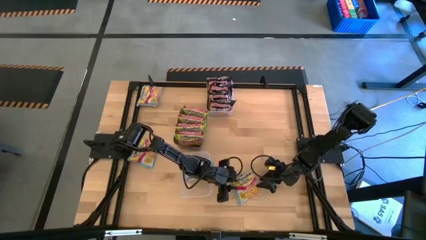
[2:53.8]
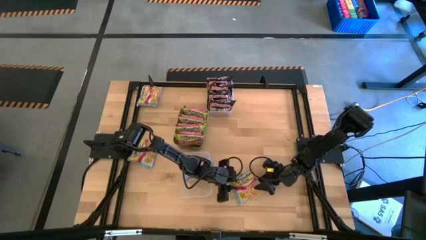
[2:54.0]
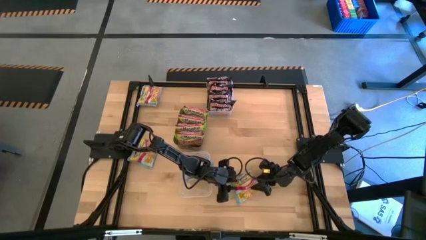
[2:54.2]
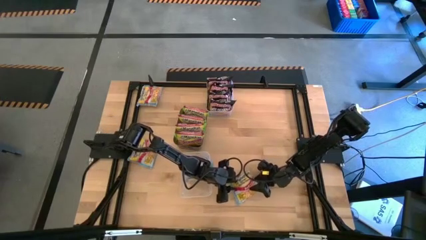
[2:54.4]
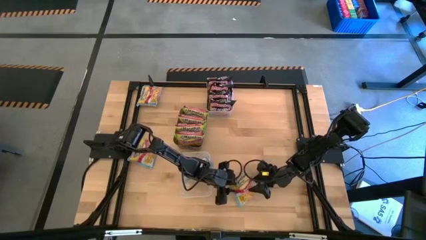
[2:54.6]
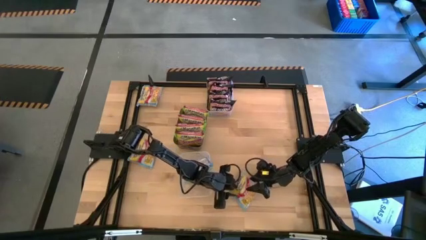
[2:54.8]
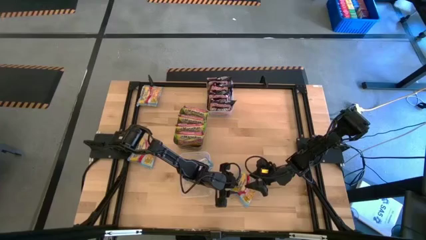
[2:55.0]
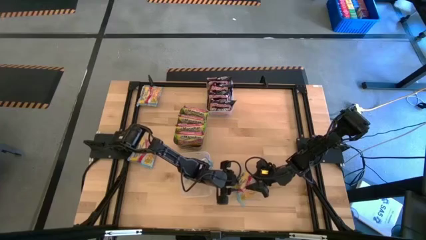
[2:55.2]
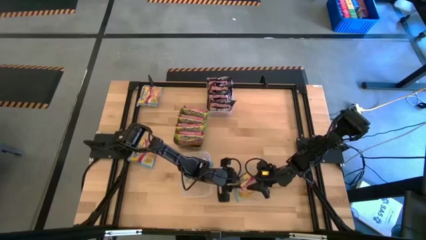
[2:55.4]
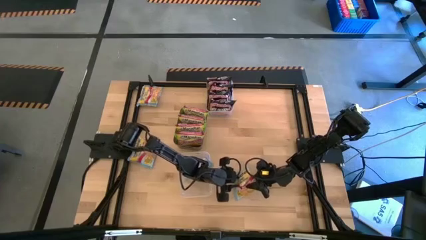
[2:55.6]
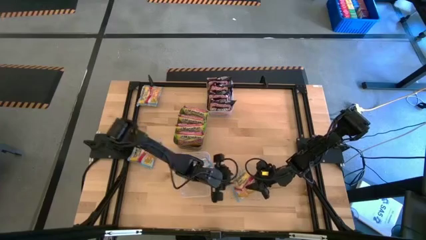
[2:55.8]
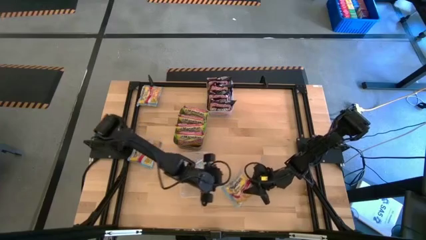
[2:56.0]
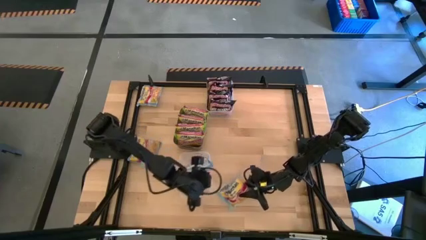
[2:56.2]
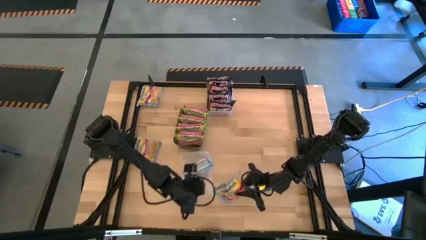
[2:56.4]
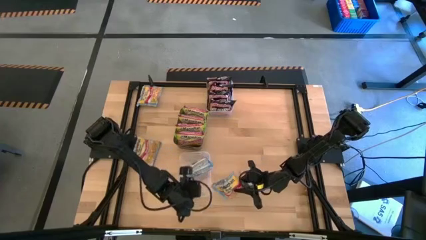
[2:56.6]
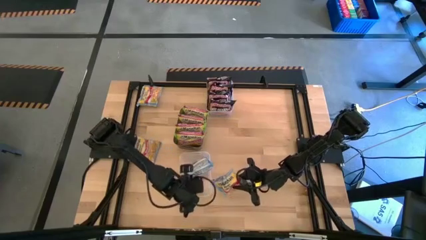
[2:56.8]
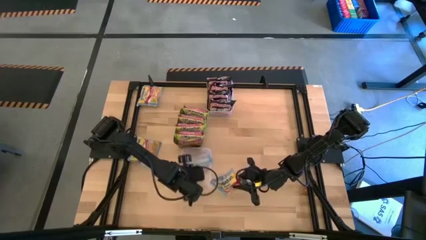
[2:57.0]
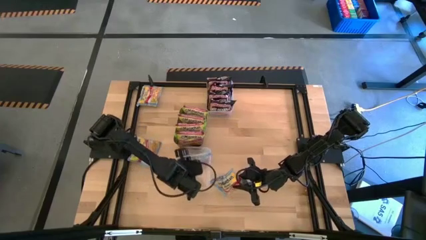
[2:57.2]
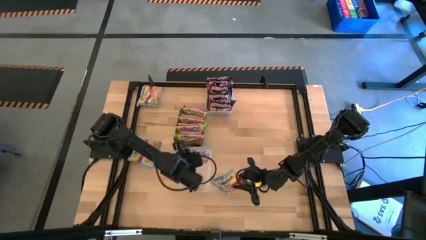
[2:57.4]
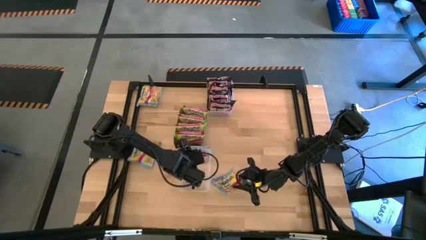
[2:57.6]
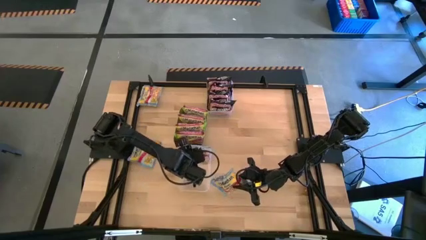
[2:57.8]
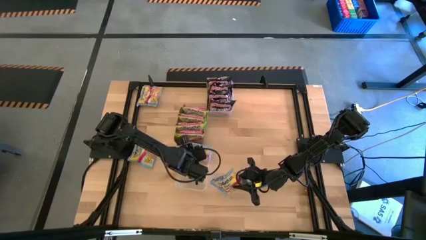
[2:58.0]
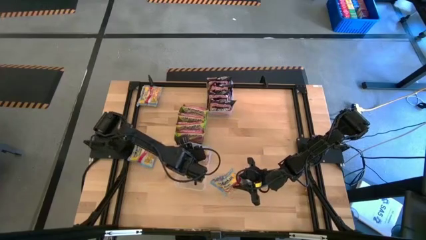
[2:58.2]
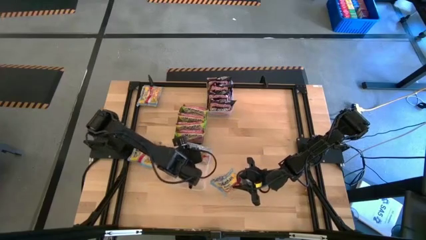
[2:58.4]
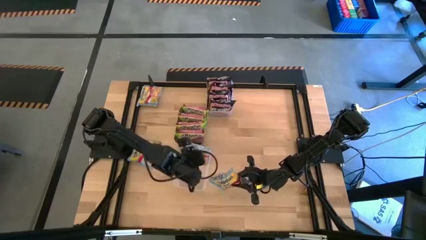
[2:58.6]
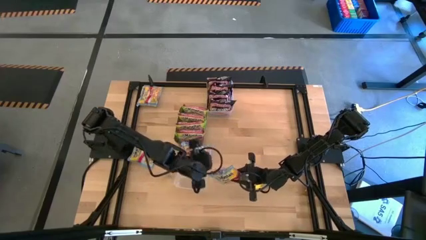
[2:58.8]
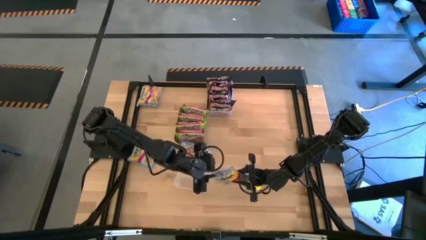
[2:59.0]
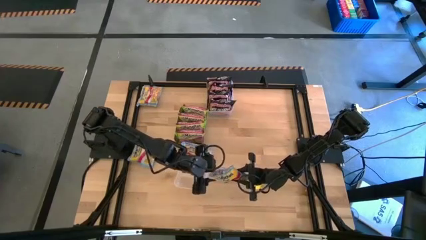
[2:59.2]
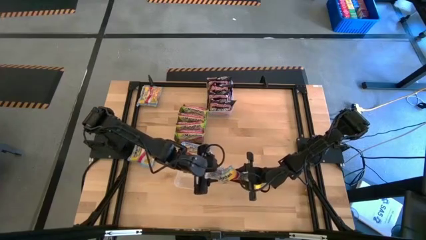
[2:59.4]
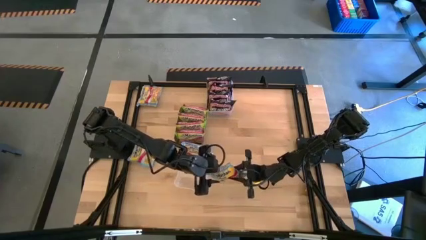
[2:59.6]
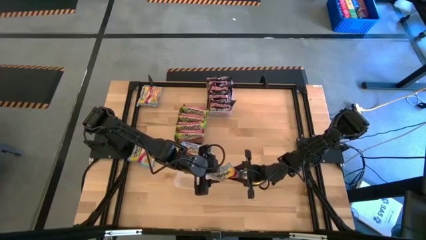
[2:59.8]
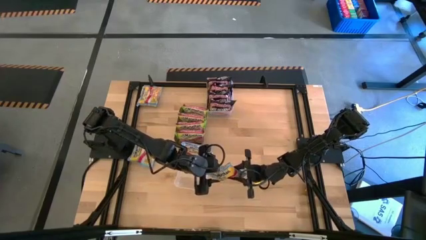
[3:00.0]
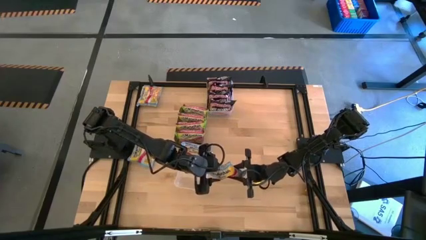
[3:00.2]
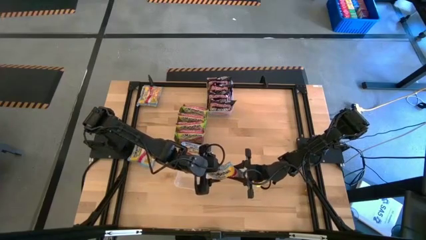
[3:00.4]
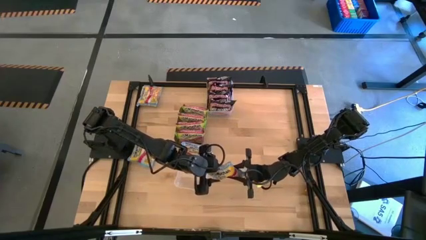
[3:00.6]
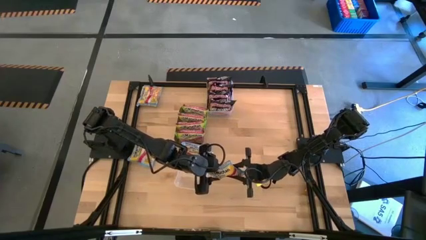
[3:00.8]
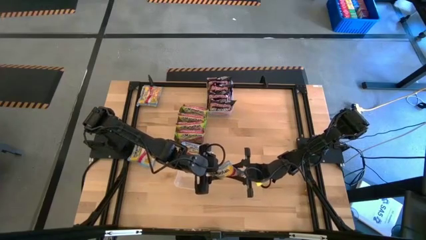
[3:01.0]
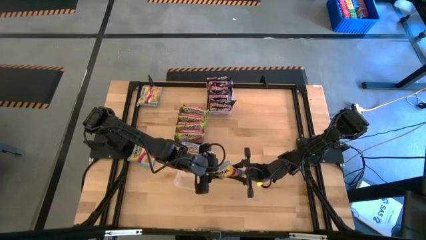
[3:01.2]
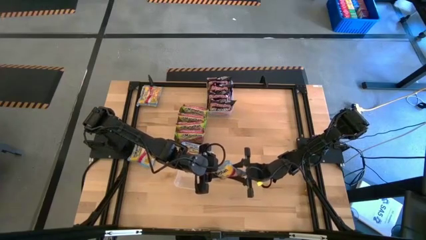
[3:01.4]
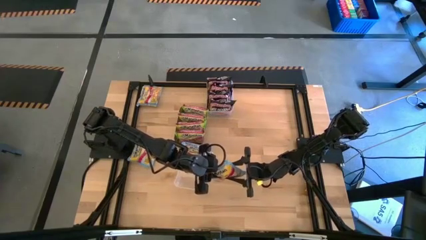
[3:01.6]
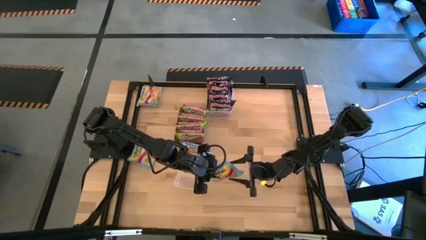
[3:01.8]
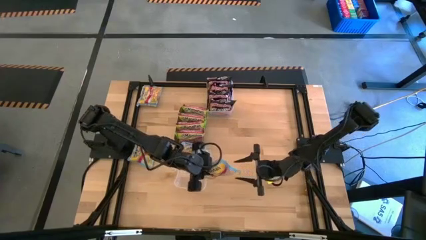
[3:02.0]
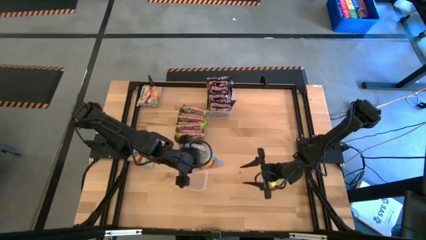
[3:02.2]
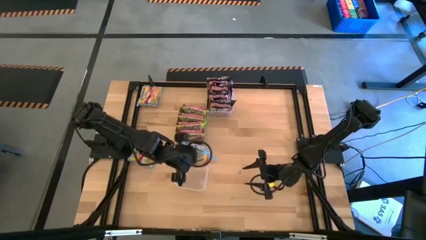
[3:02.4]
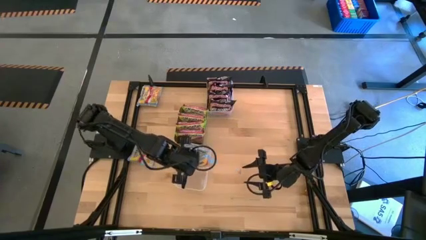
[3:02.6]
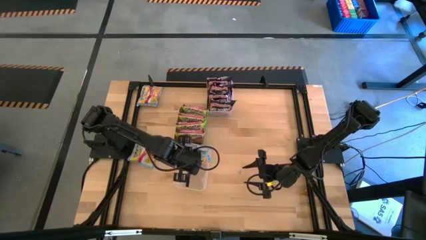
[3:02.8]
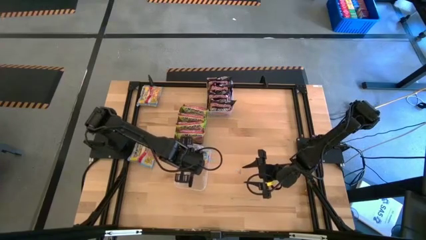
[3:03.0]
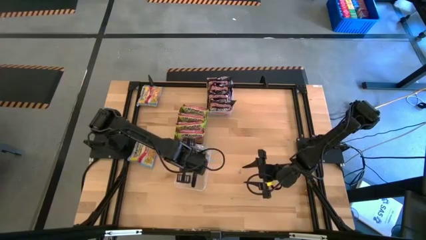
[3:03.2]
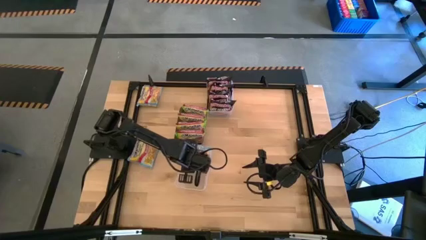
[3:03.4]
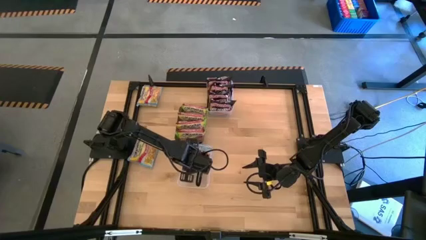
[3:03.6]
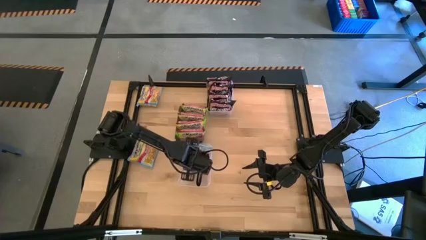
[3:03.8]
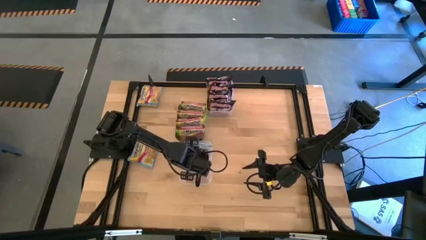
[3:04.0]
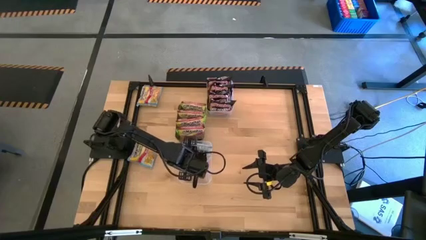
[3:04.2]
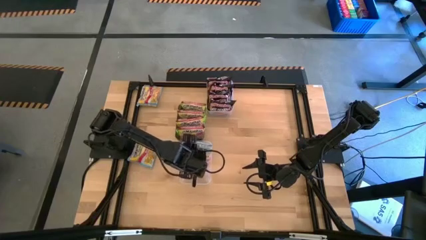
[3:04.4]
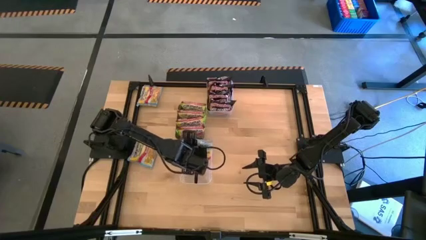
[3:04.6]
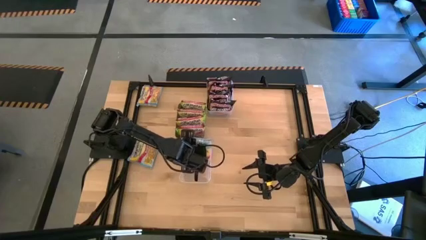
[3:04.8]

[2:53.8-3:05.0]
Task: Sort Maruchan noodles
Put the right blue noodle pack into the bottom transparent bin

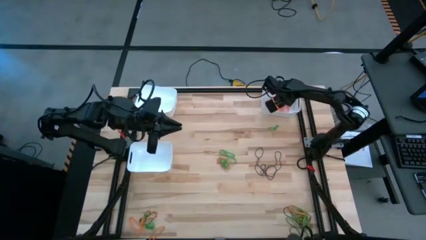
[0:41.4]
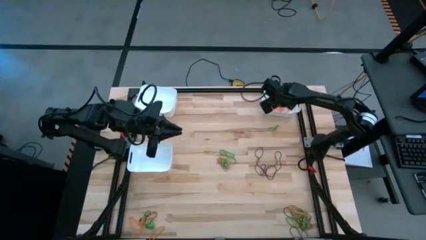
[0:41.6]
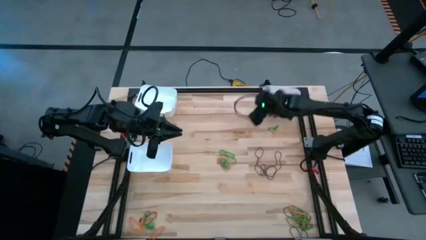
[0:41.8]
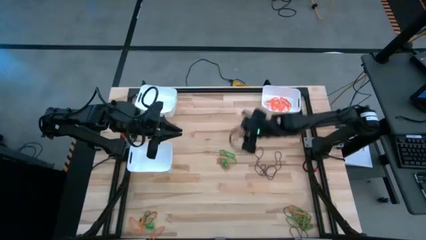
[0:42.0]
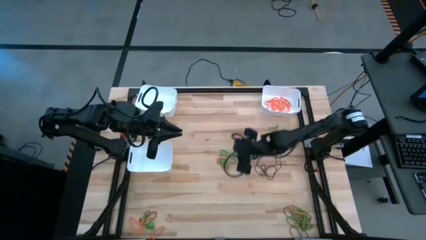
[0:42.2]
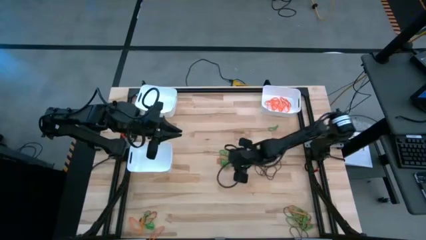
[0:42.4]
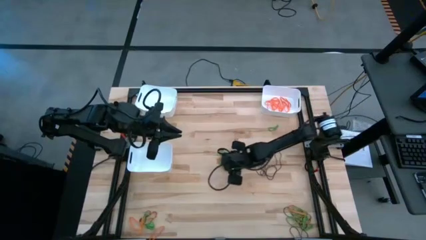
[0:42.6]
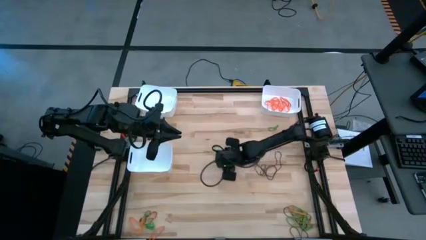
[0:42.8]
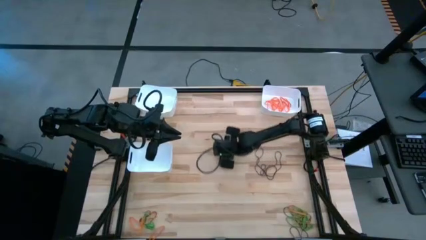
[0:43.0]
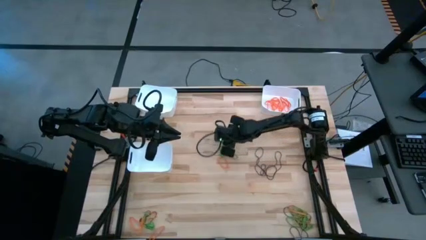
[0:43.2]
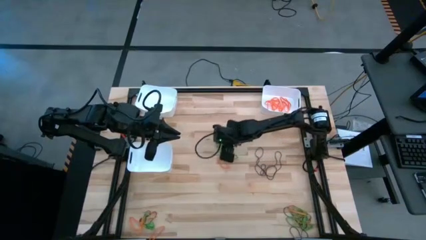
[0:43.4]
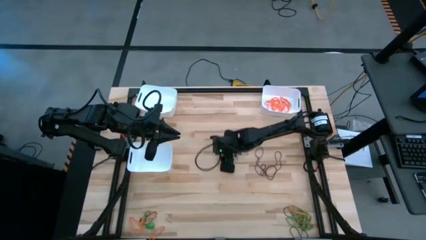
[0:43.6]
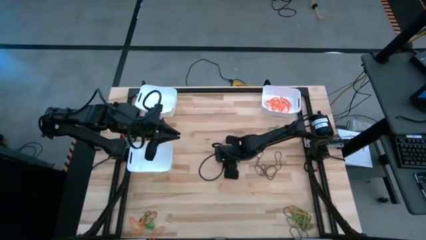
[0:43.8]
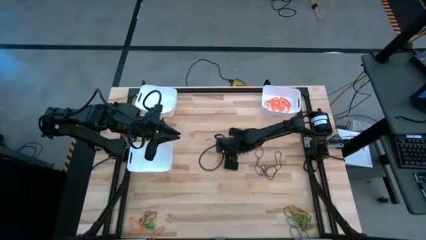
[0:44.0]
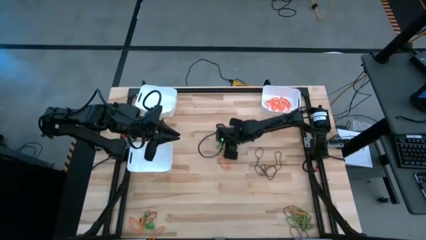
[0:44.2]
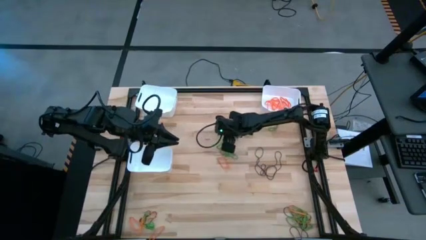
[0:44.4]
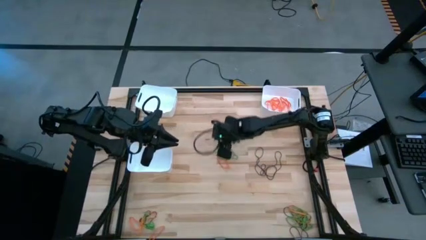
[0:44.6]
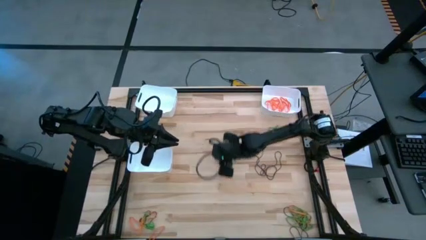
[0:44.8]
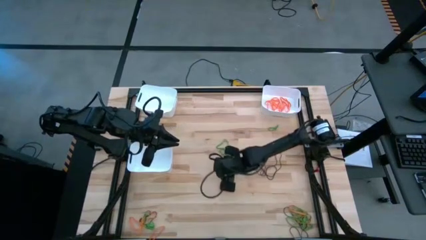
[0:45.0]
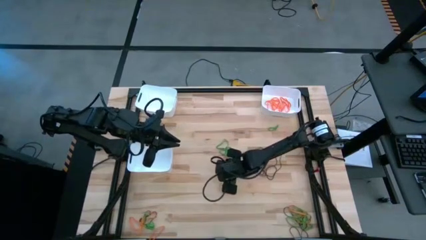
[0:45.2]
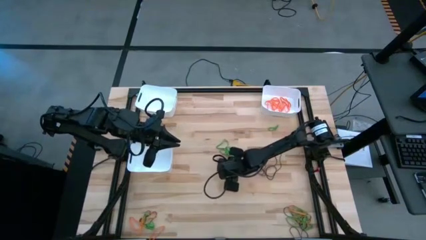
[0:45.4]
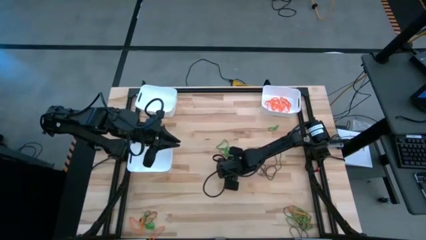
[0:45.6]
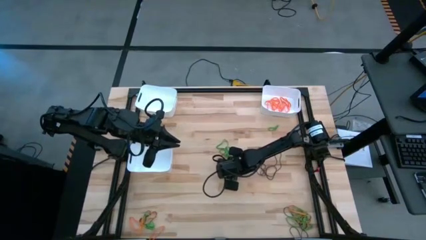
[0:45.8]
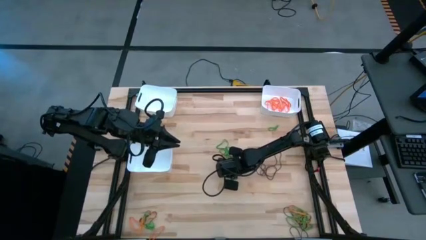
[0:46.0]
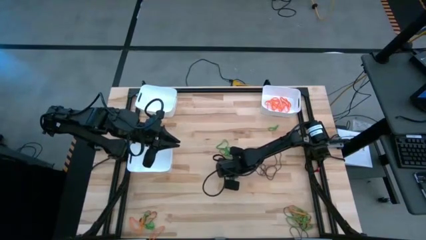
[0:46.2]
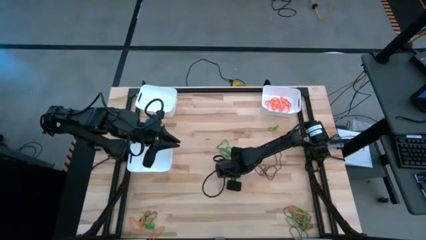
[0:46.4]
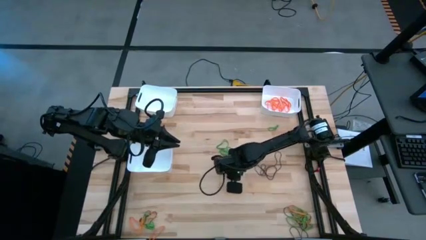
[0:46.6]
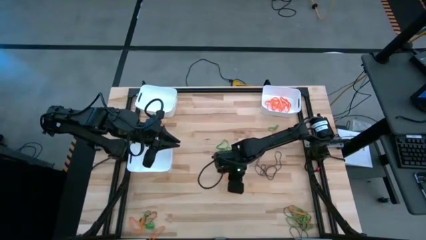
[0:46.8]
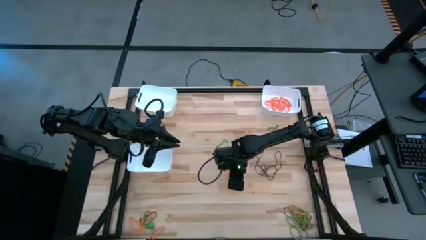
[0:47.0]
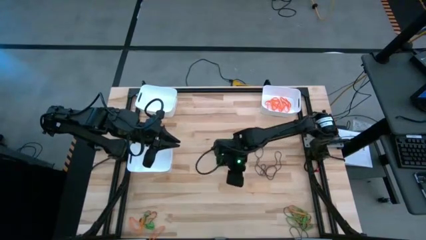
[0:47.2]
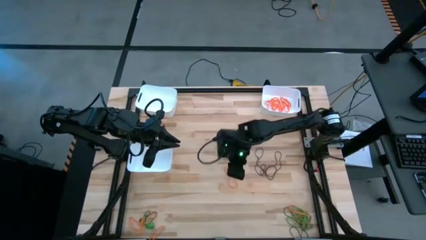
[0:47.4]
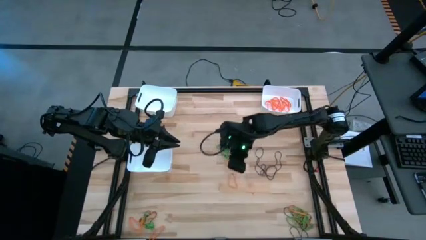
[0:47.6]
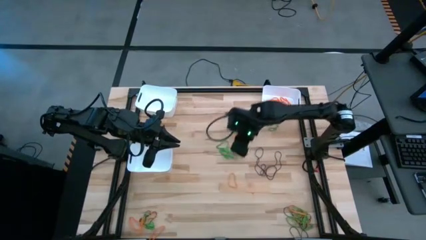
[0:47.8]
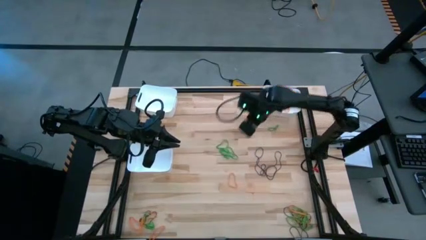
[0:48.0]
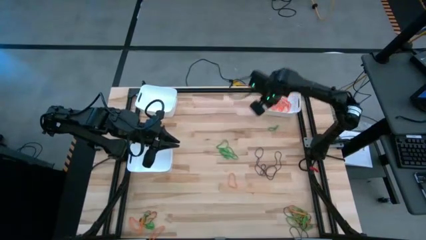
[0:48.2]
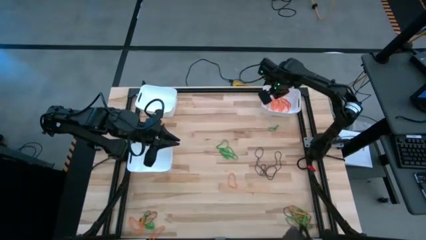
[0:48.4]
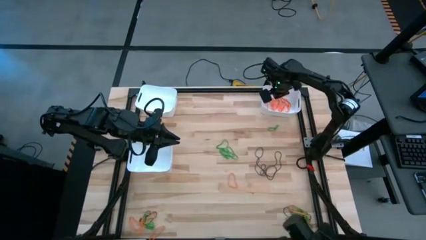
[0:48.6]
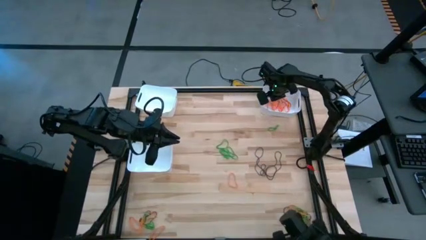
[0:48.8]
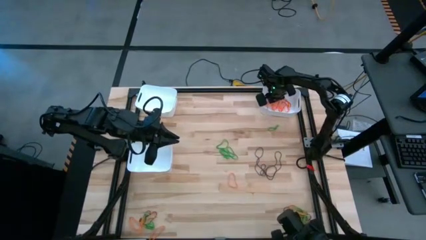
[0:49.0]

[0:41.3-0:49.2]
Task: Sort rubber bands into baskets
Put the orange rubber band into the top right white bin
